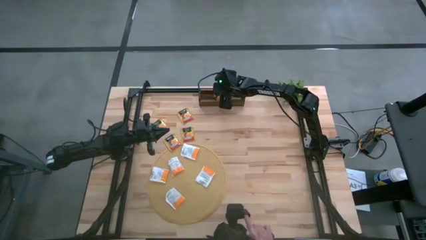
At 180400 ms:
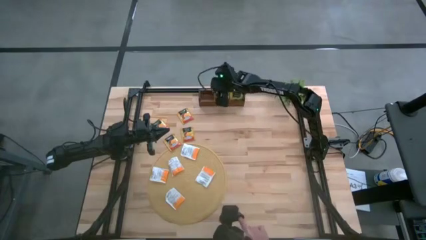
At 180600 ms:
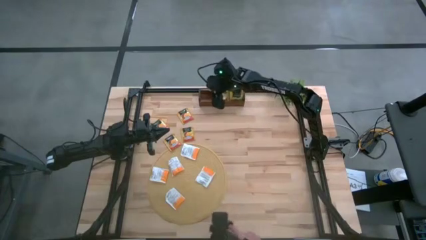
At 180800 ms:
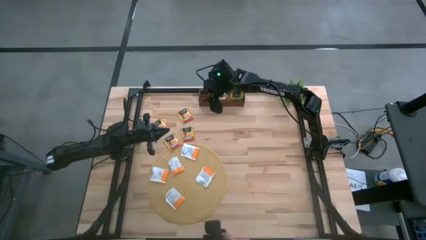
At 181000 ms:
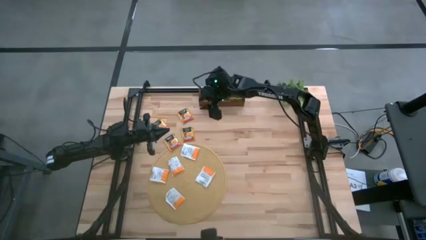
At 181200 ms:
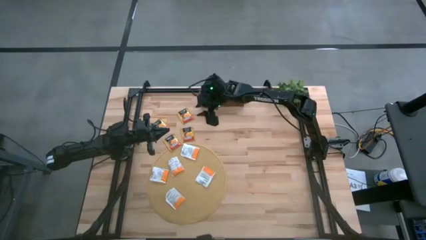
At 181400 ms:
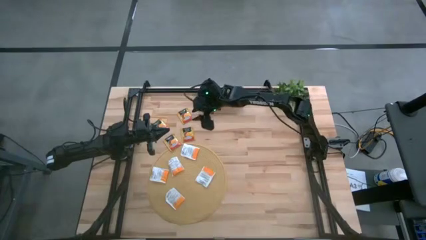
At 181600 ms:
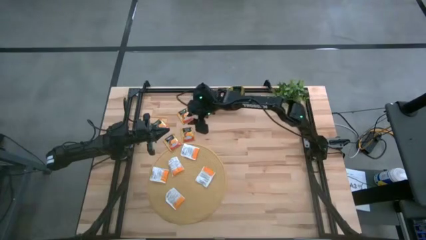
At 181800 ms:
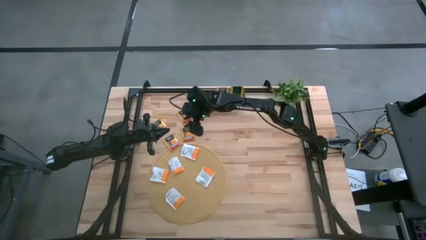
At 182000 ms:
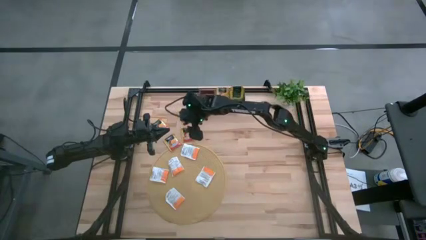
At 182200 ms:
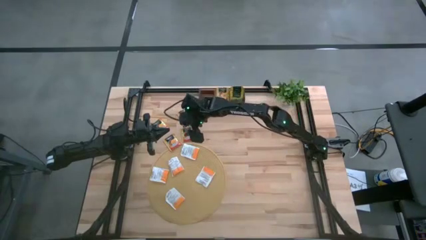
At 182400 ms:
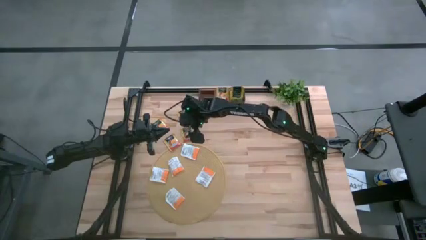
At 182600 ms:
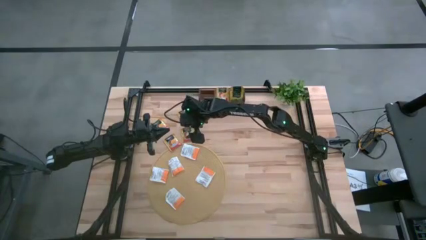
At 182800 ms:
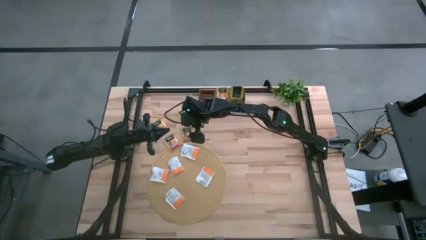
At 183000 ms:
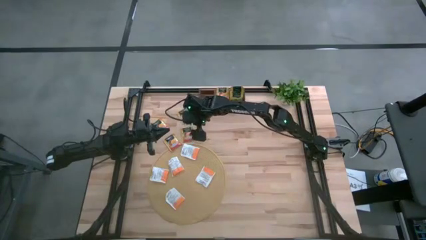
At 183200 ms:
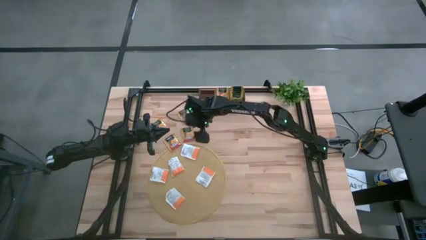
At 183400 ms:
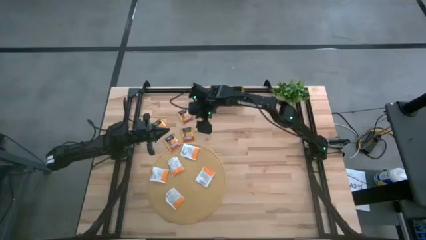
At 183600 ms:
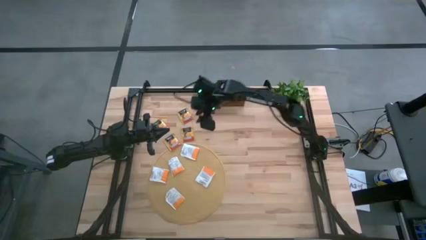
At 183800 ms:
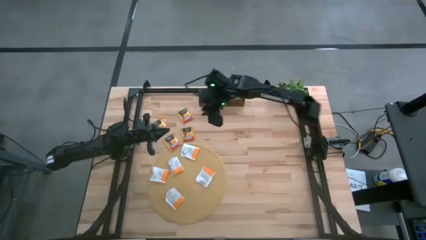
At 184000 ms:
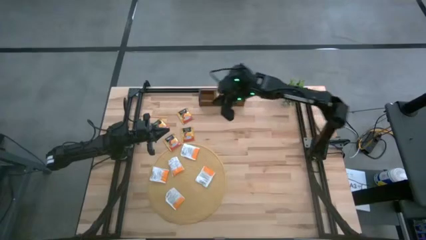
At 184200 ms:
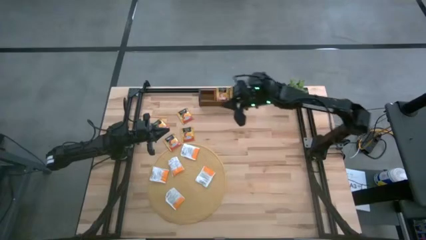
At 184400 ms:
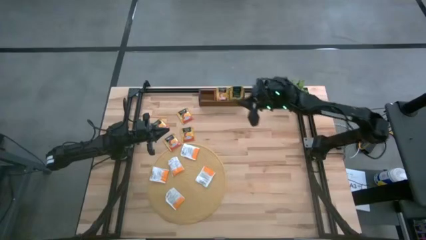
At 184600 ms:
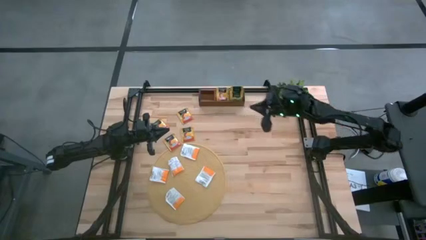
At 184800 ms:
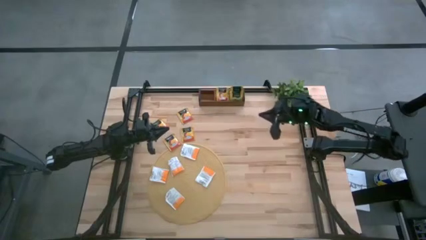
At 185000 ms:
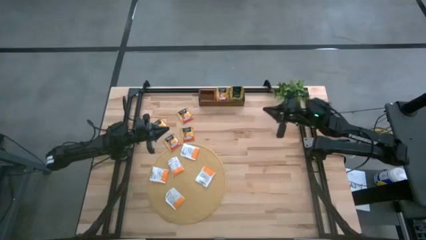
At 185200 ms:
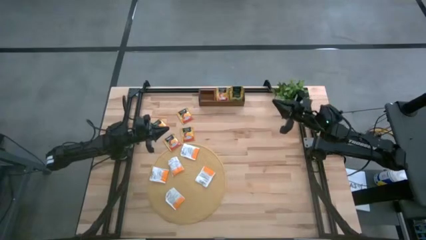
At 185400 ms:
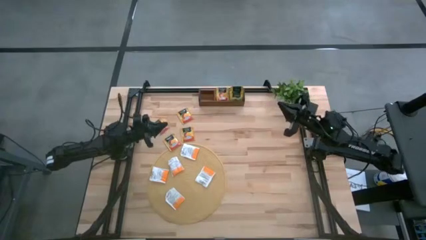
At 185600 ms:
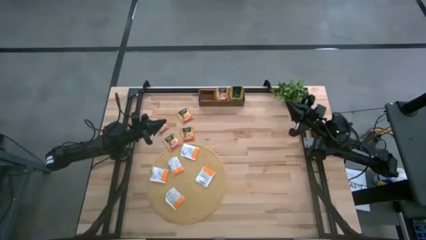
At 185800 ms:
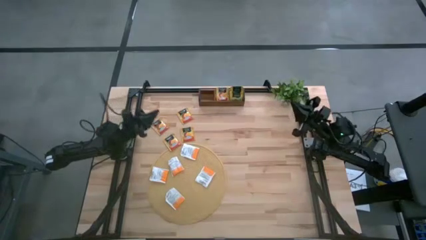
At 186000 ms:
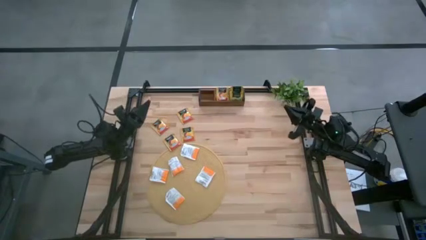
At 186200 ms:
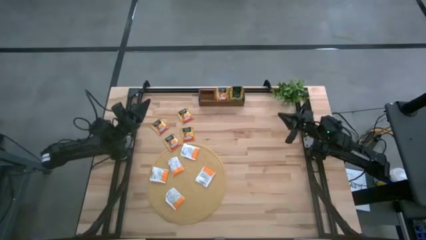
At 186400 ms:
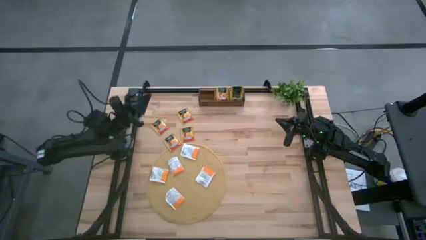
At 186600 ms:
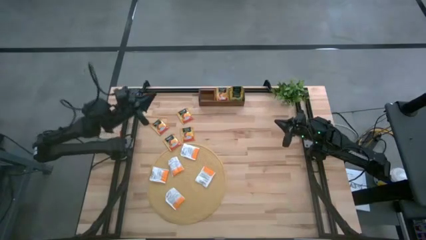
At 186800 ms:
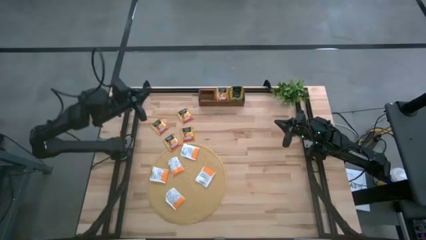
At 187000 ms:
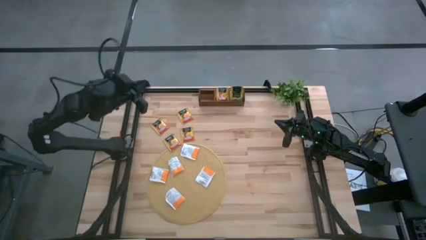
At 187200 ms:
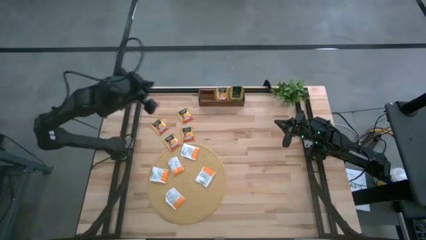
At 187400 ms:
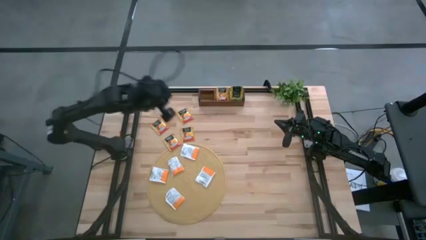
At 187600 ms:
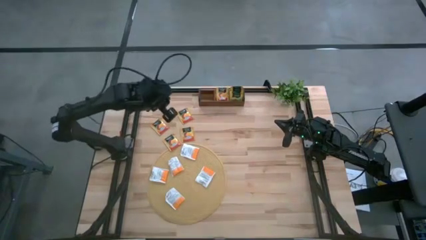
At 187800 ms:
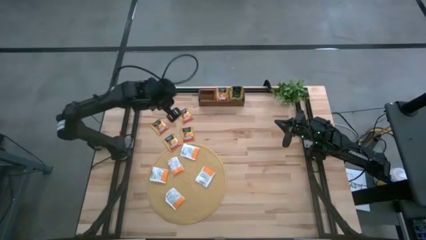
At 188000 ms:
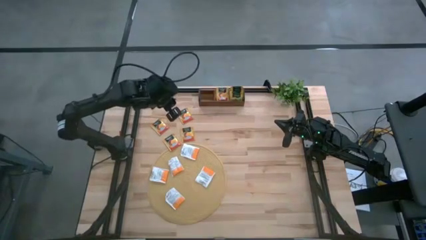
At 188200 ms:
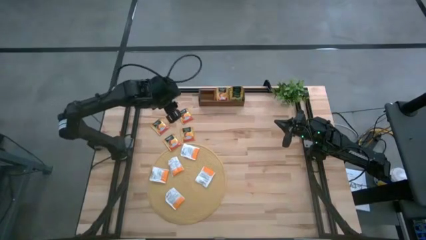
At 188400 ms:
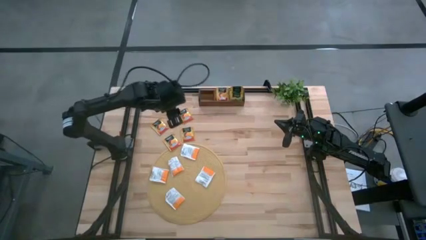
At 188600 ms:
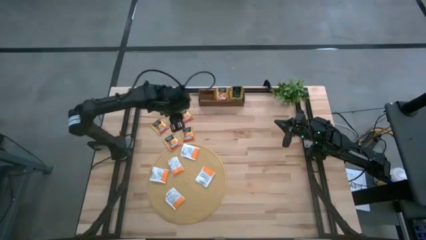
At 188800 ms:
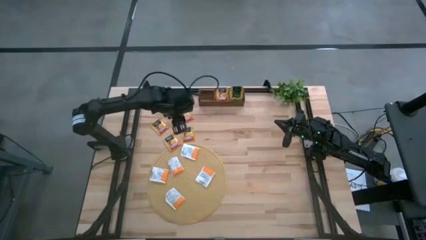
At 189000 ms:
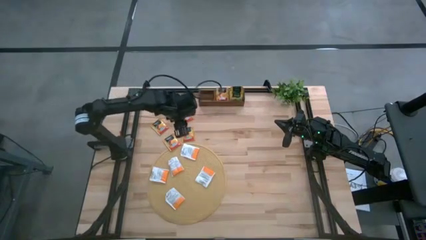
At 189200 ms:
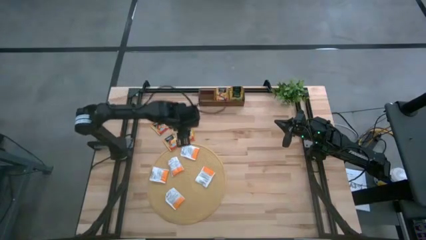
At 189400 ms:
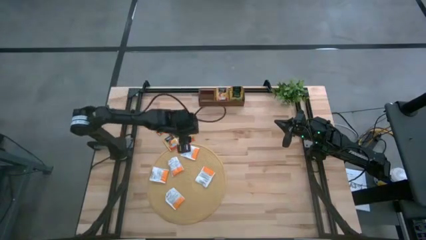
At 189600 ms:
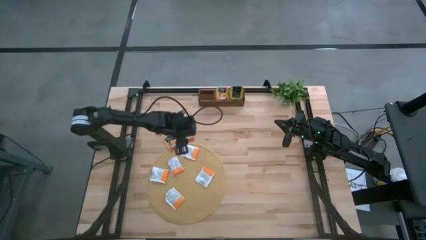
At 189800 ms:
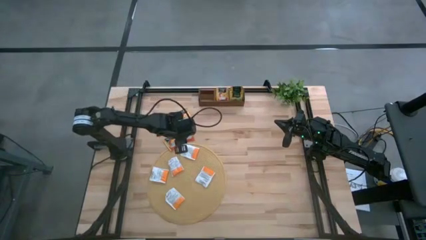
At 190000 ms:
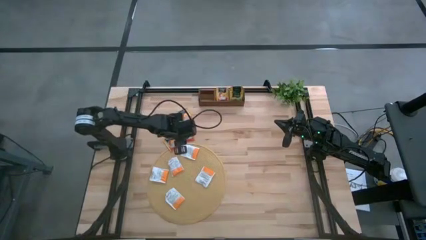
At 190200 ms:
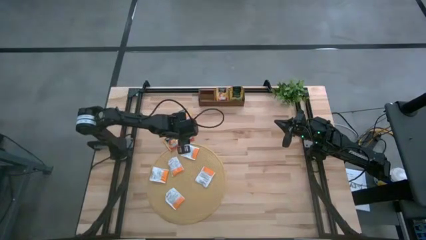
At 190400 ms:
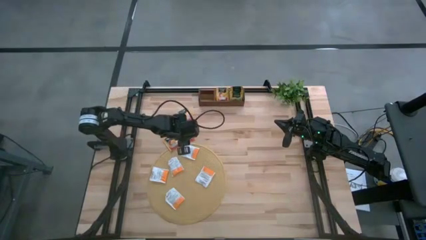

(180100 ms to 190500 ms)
Task: Pick & Place Tea
Put the yellow tea bag into the middle slot of the wooden organizer

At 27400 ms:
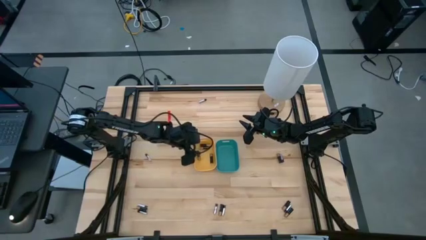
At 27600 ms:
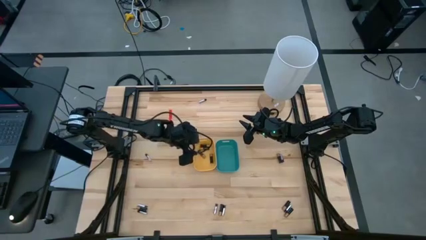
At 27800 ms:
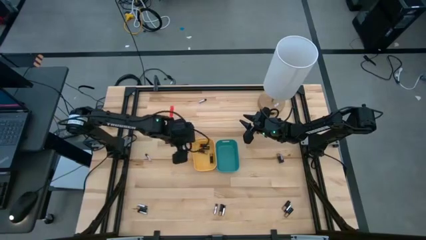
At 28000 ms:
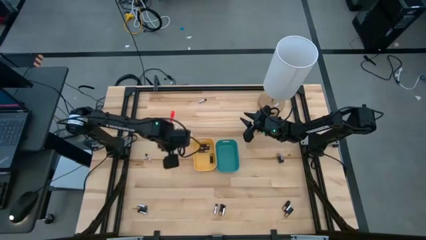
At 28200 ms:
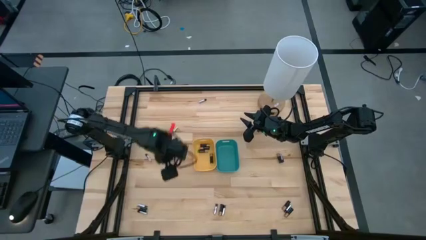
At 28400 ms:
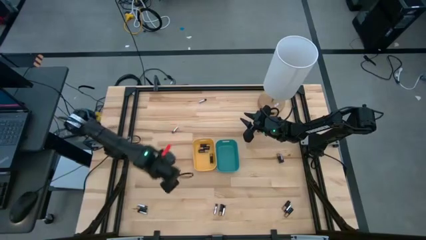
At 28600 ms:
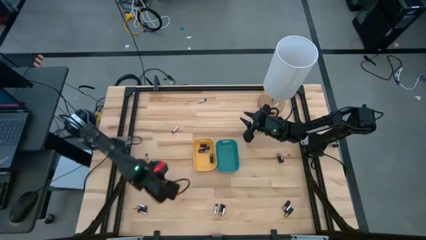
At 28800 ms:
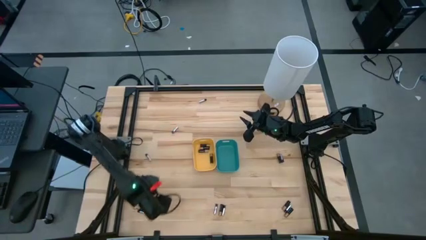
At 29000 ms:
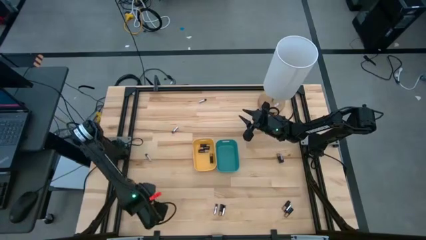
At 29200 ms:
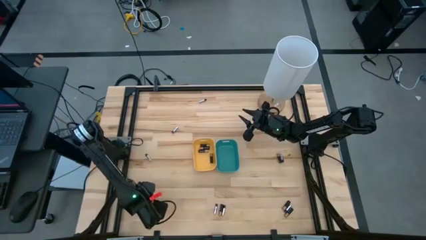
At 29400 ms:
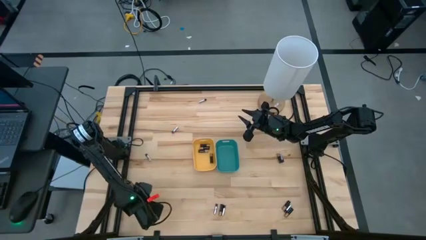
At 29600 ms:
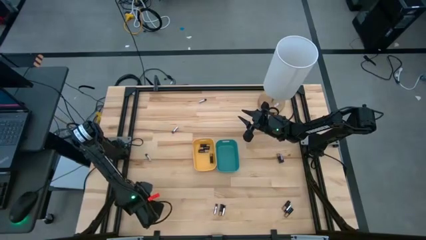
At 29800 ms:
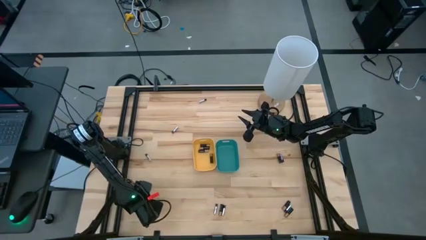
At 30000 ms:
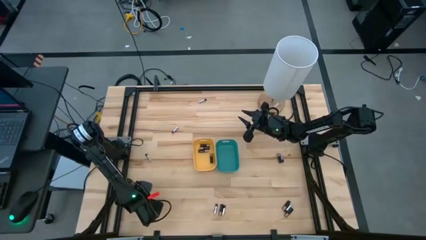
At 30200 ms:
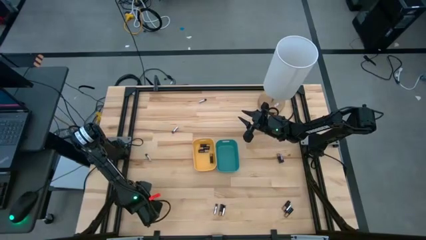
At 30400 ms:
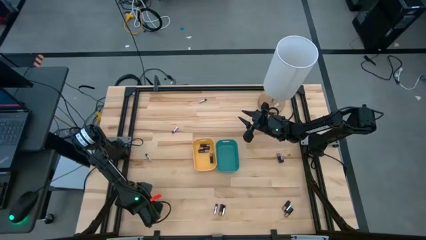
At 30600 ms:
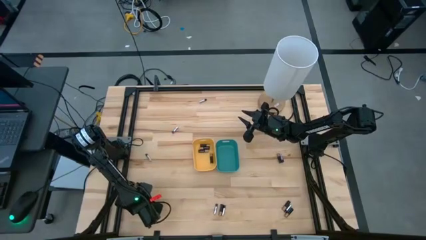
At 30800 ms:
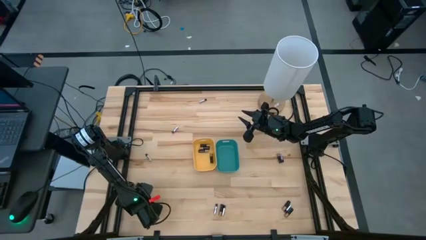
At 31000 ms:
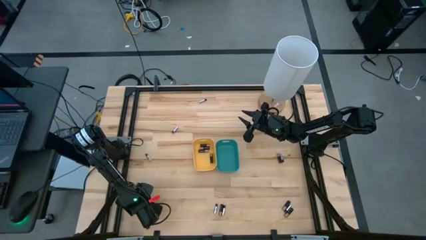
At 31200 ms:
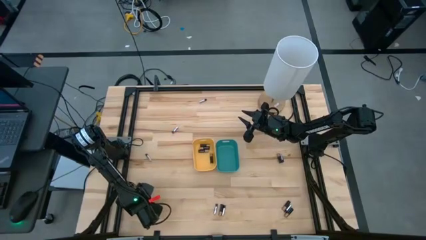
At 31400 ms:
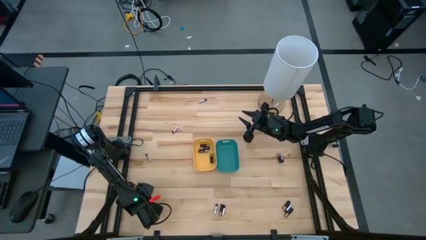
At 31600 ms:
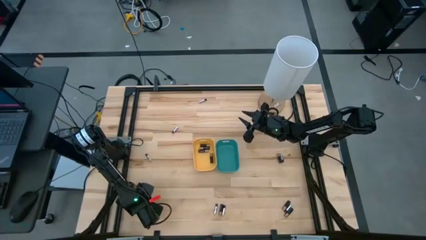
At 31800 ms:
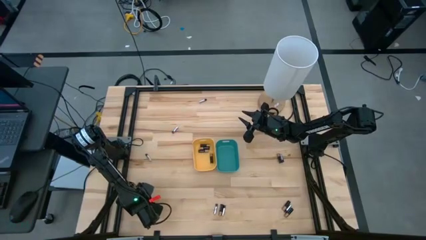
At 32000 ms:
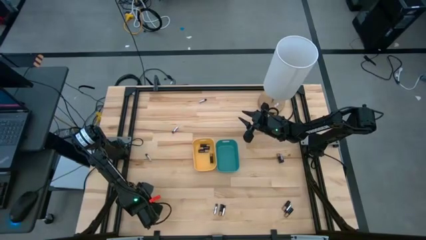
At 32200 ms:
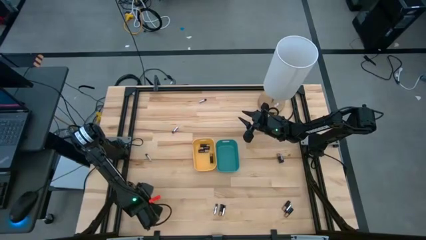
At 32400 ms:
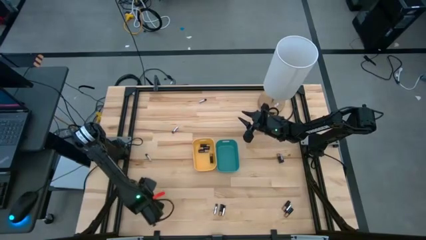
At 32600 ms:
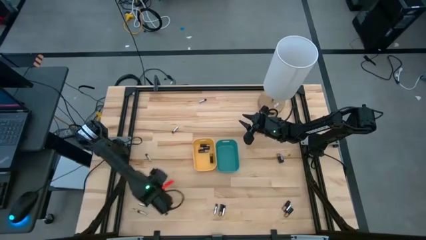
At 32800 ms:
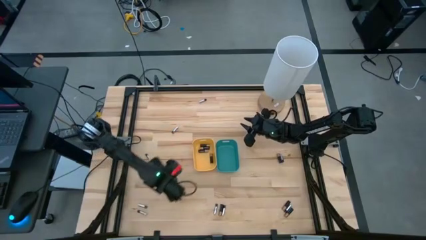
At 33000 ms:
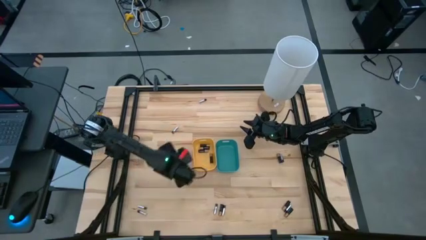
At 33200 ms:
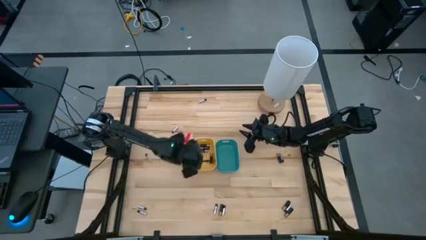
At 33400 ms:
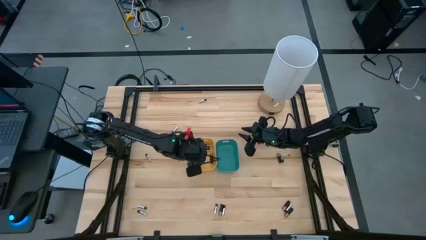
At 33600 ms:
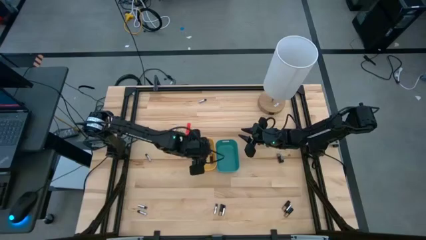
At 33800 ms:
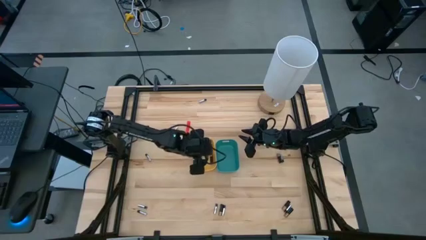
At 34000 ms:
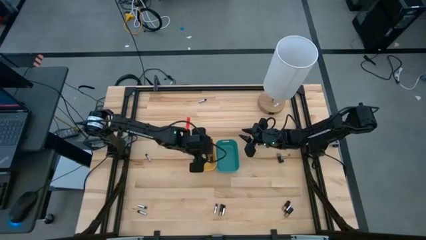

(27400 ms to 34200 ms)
Task: Sort batteries
Put the black battery into the yellow bin
